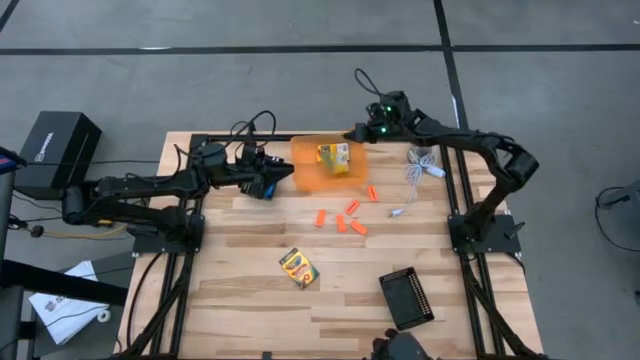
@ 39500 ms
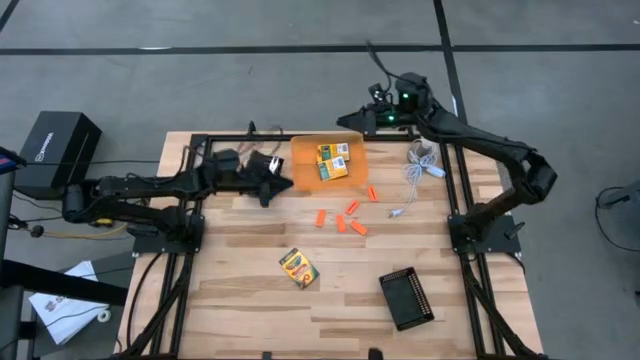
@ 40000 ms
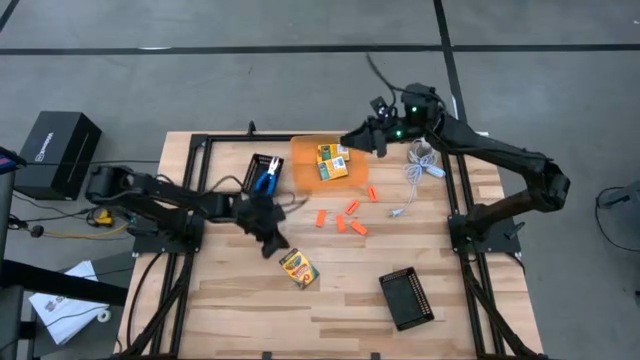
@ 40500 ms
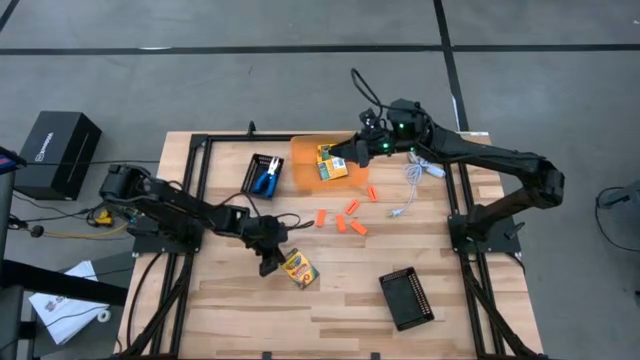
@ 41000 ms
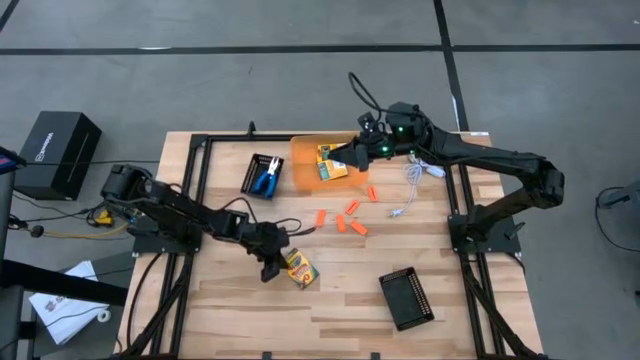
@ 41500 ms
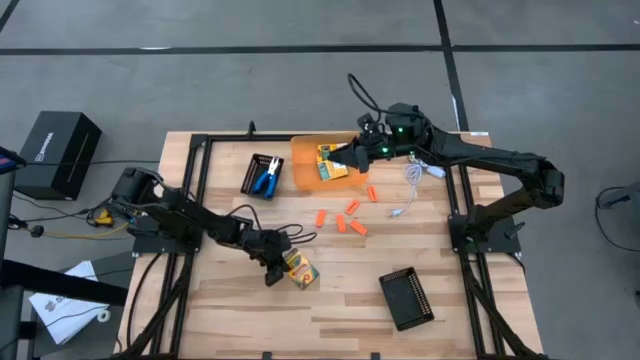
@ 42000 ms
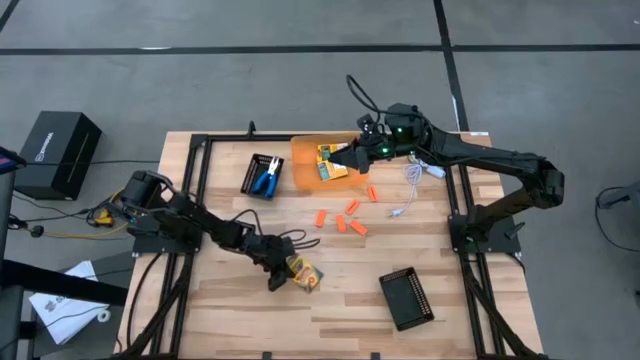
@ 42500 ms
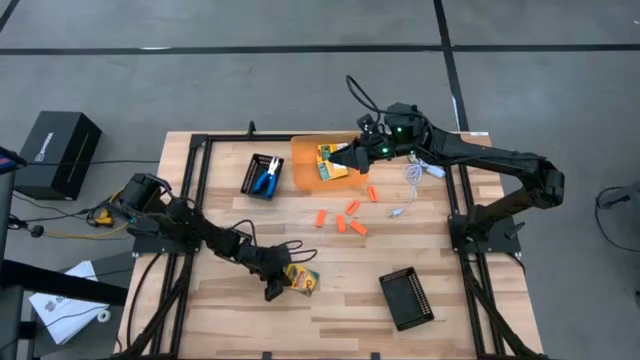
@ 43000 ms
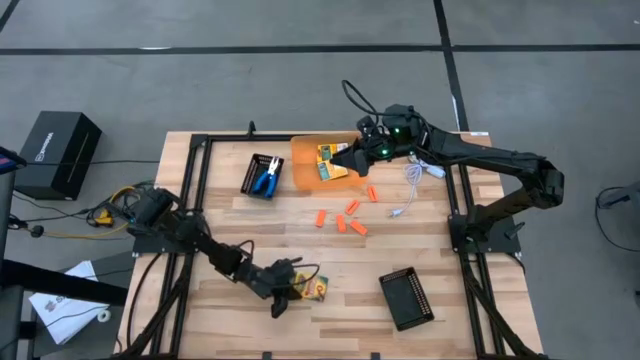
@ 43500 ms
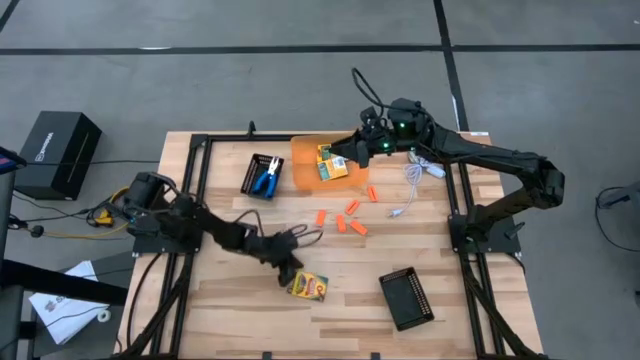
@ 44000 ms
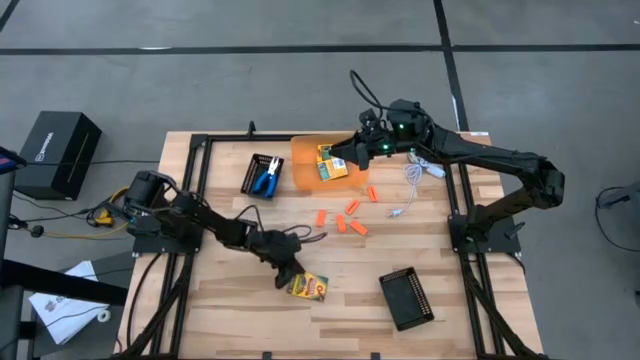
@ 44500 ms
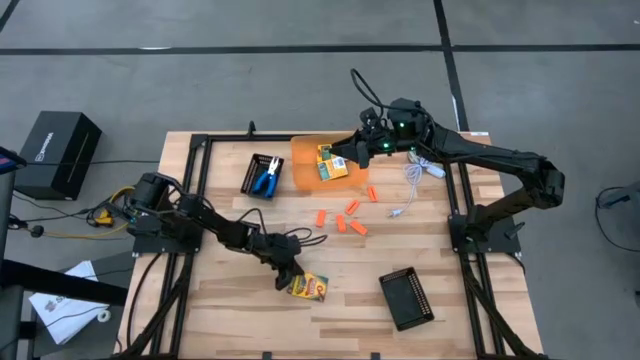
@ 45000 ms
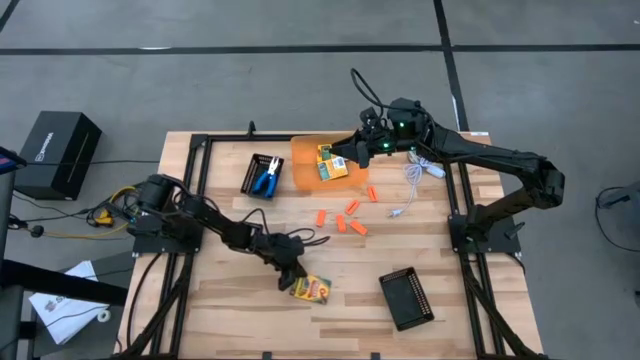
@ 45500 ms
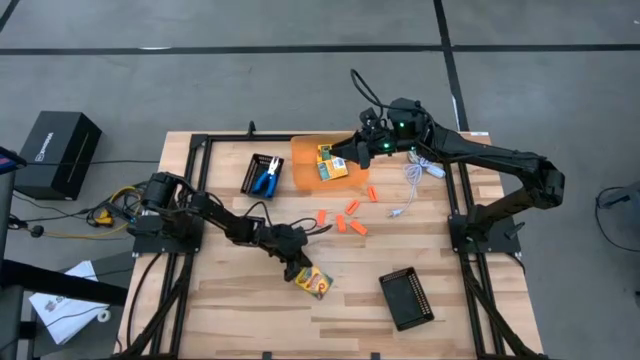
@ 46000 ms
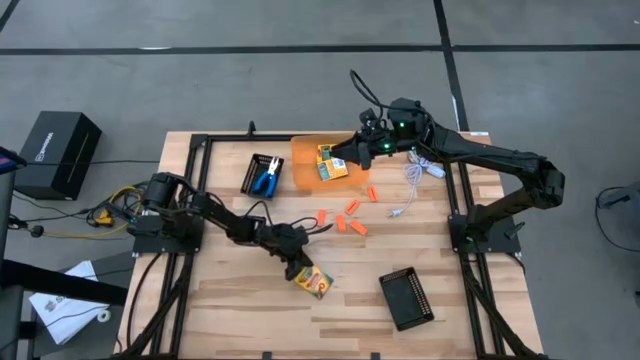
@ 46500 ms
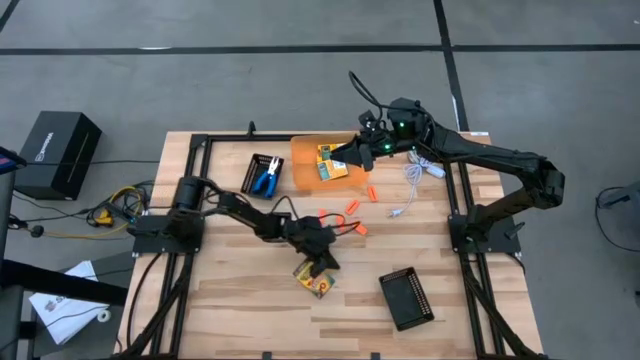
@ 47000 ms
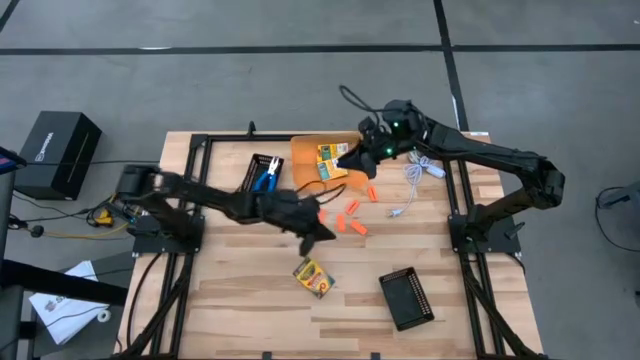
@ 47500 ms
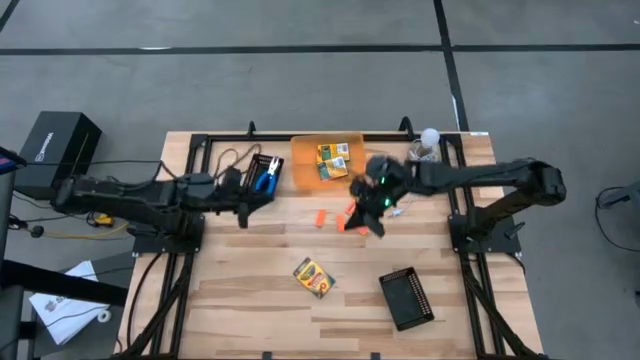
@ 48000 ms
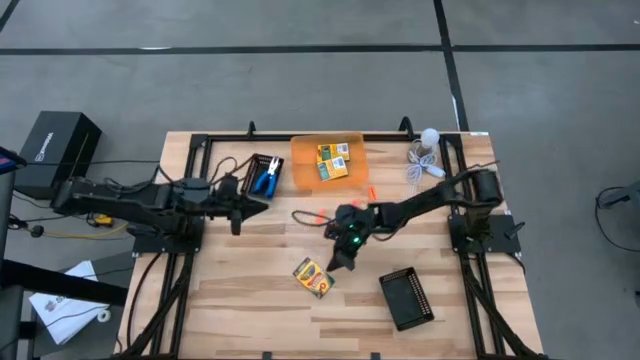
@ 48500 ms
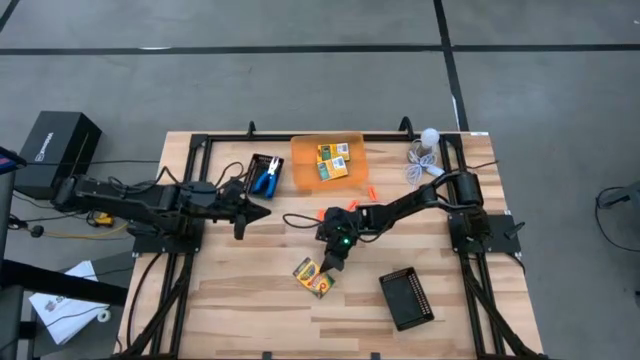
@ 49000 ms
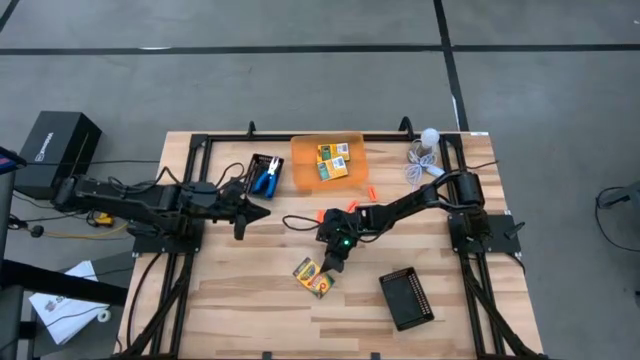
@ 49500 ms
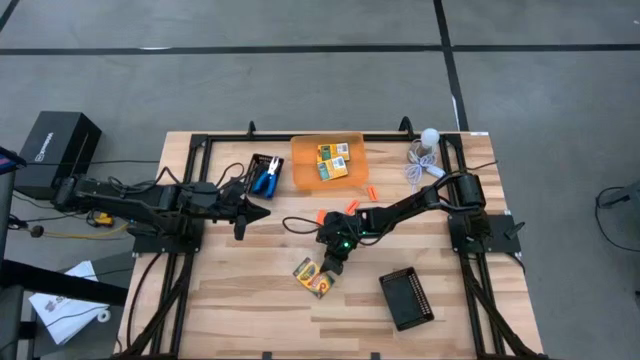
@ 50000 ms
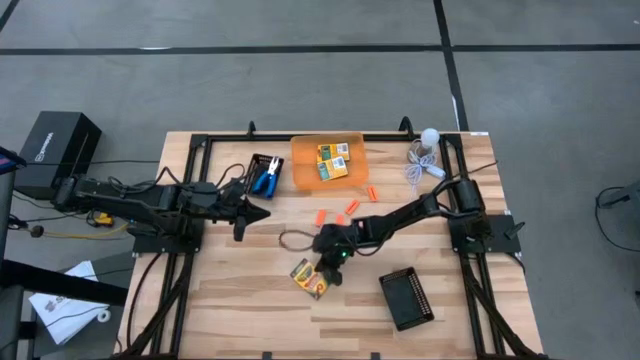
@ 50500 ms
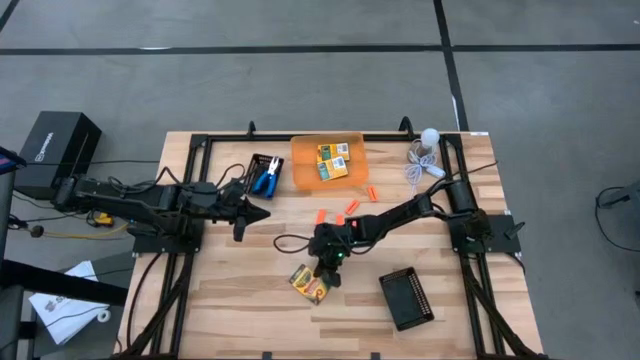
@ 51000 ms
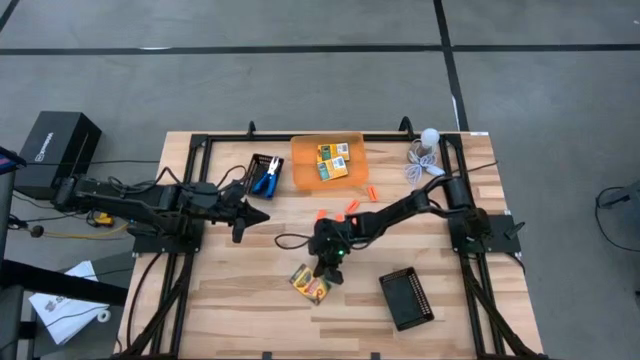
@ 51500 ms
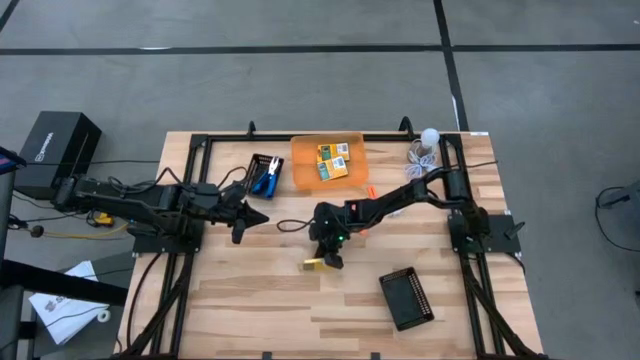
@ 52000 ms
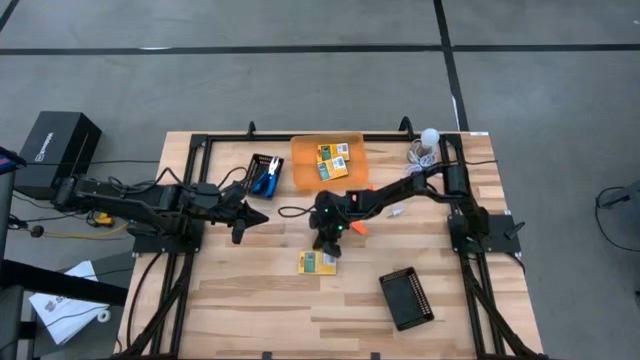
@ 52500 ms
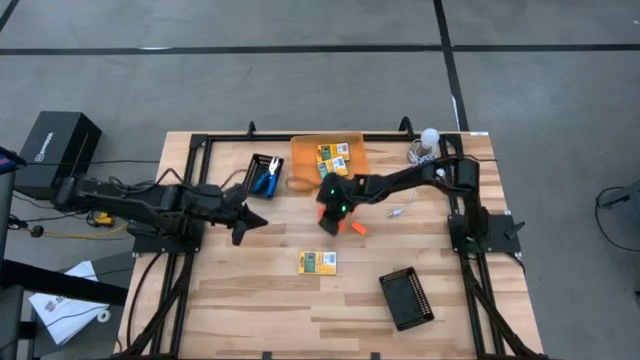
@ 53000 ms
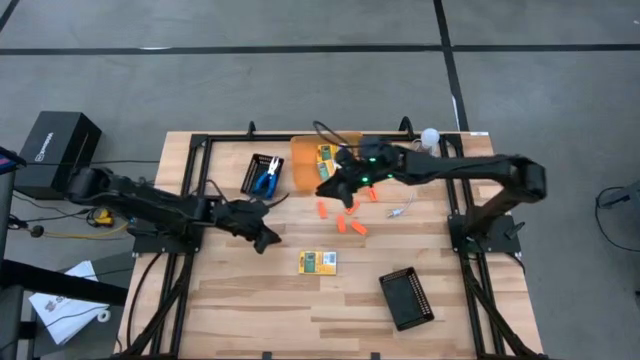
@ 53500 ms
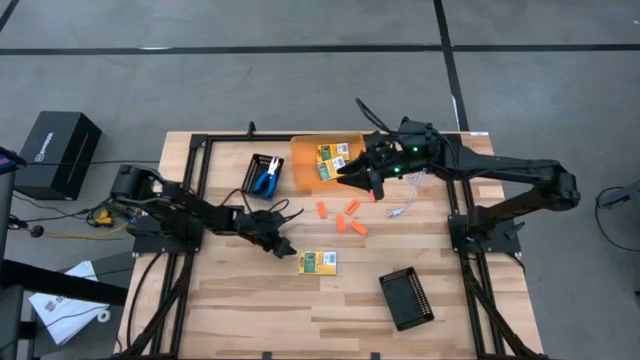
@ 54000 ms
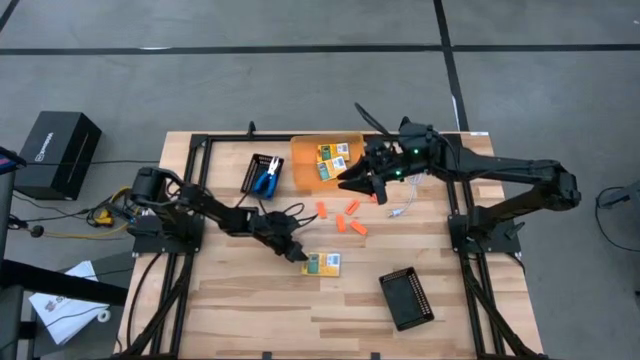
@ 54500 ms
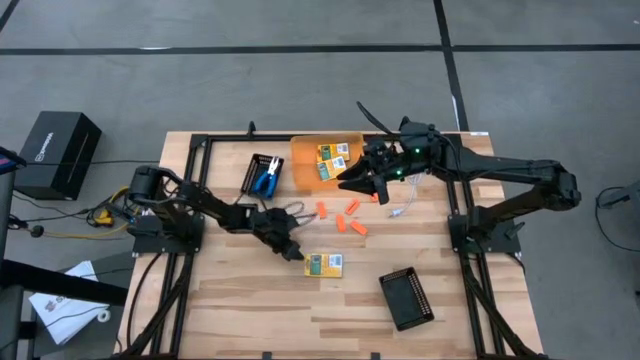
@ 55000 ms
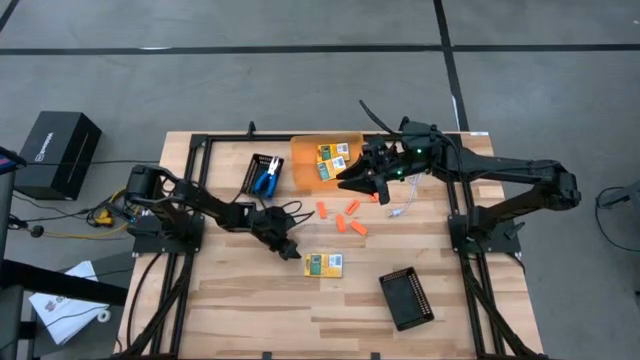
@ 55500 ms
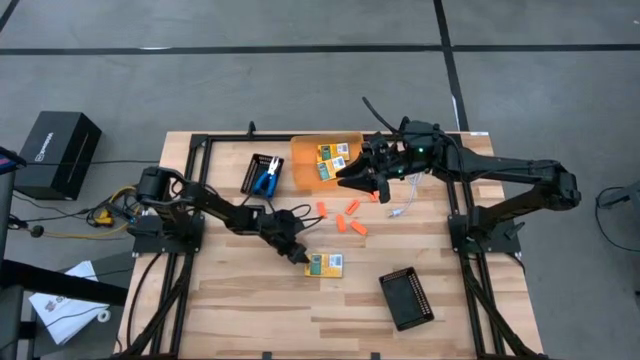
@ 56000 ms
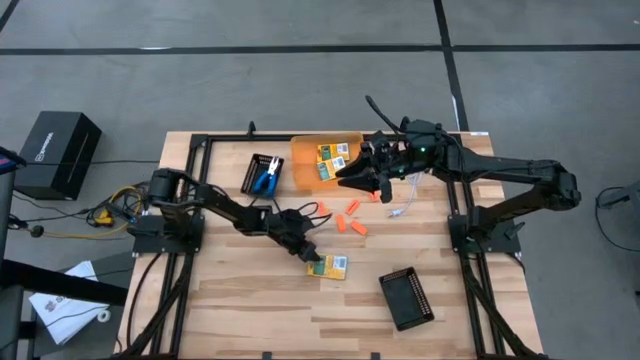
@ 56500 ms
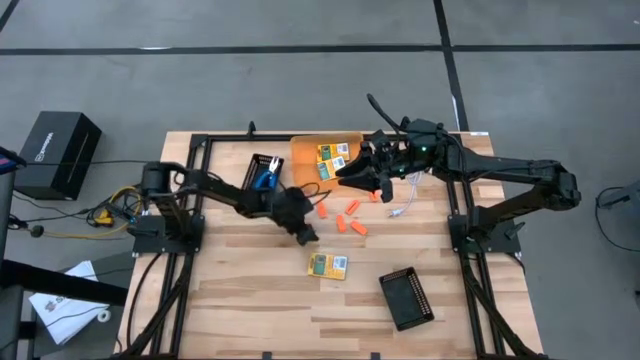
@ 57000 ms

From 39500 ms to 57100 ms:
Task: Pick & Place School Supplies
Put the yellow crayon box into the orange bin

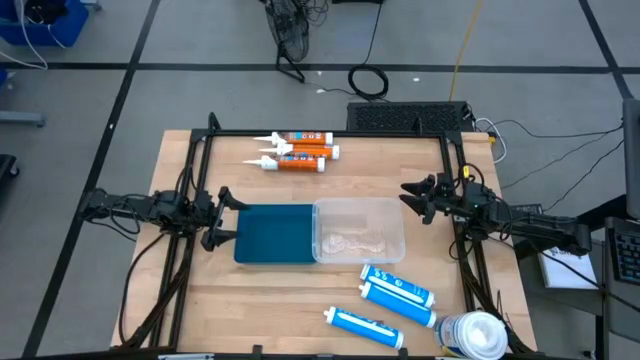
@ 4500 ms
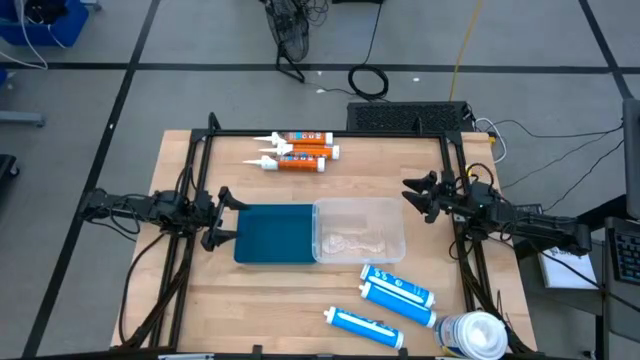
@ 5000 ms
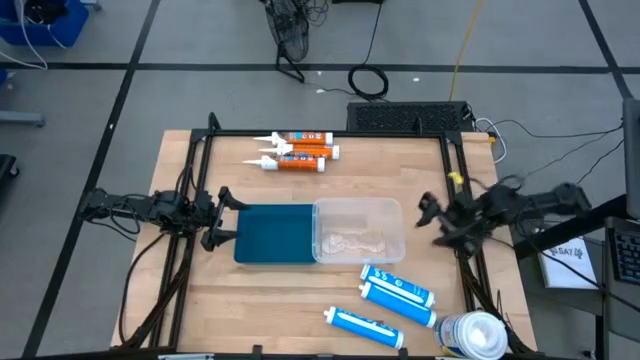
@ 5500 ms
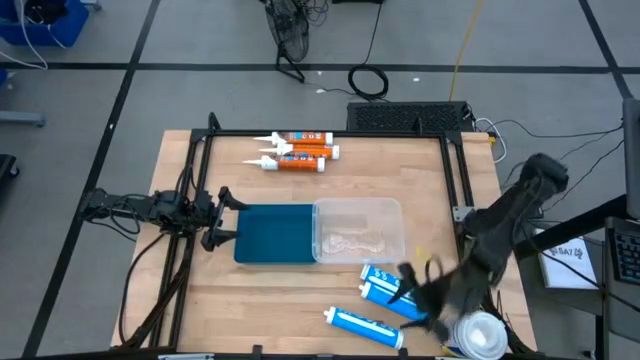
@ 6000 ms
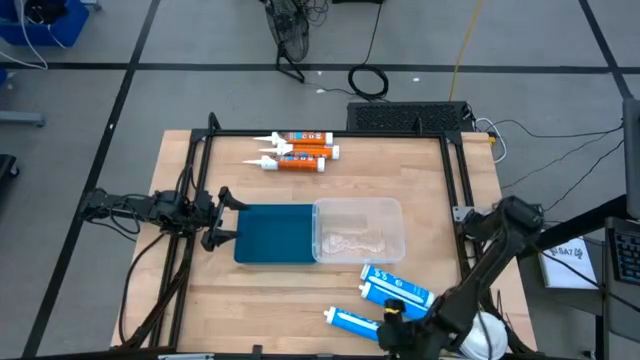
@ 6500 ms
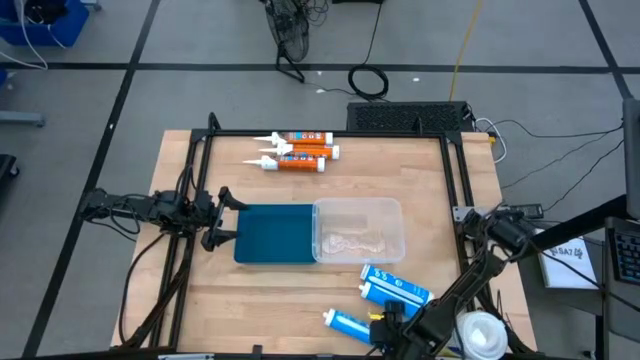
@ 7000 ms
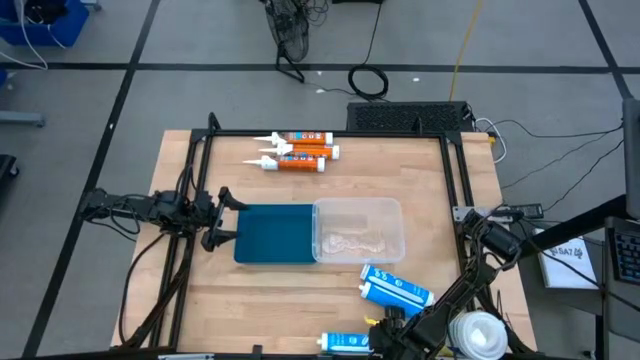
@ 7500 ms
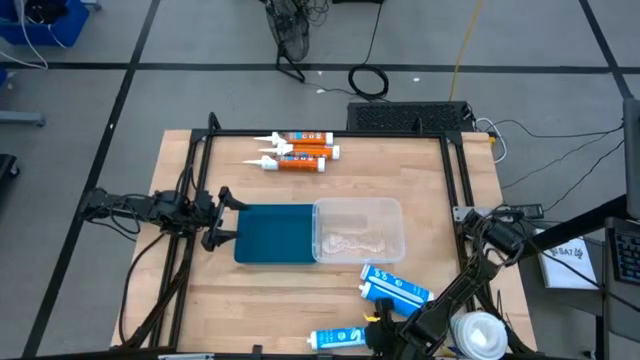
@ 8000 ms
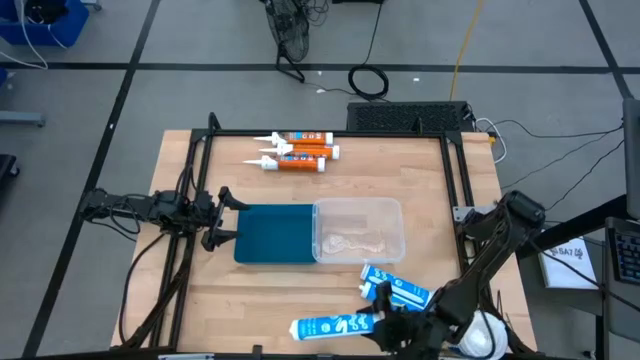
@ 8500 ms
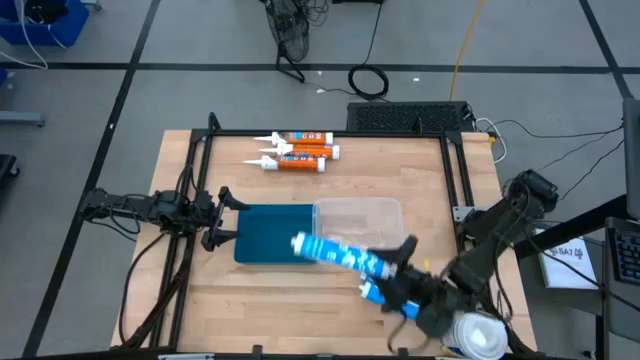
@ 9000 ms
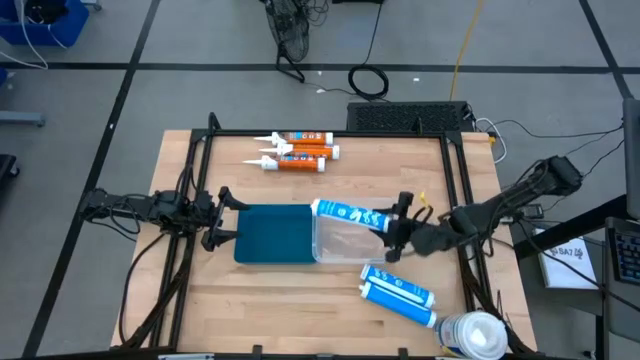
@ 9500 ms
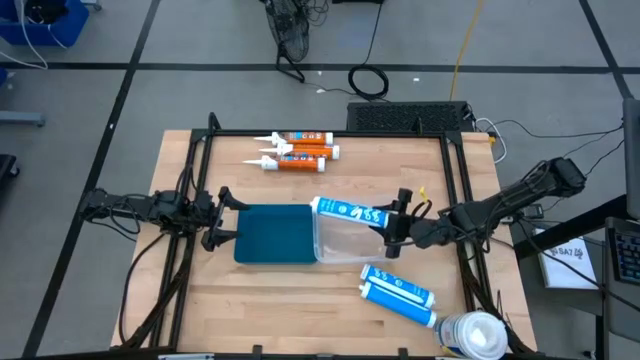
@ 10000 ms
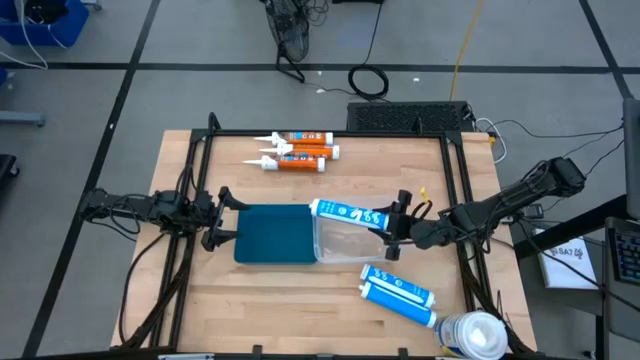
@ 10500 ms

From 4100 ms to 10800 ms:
Task: Pick & place silicon tubes, Sealant and Lysol wipes
Put the bottom blue sealant bottle into the transparent bin
